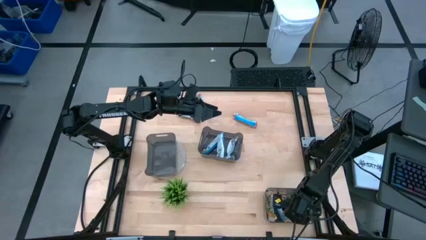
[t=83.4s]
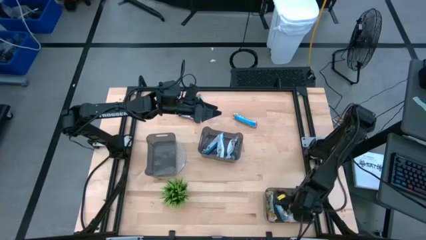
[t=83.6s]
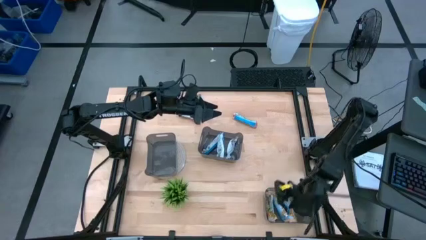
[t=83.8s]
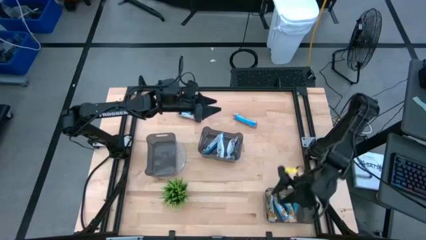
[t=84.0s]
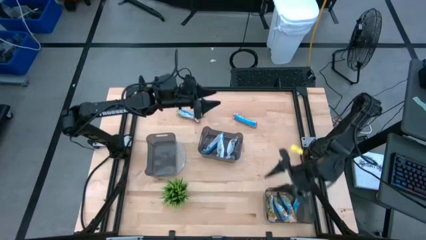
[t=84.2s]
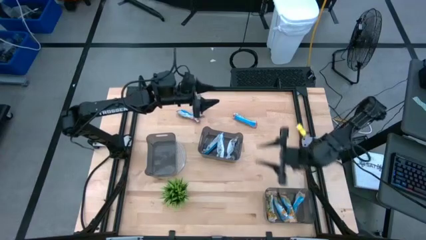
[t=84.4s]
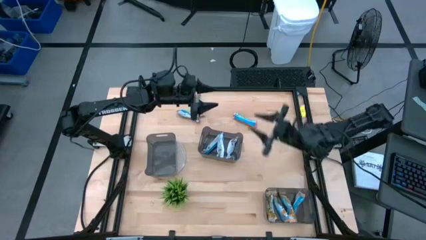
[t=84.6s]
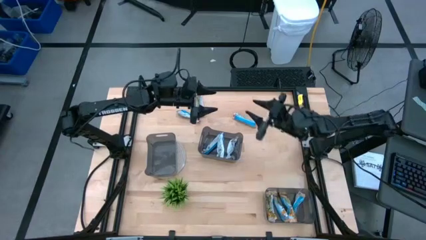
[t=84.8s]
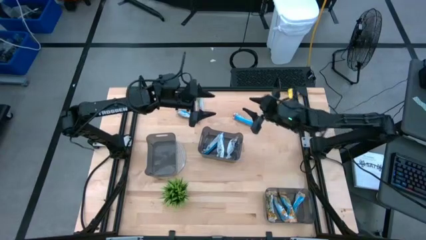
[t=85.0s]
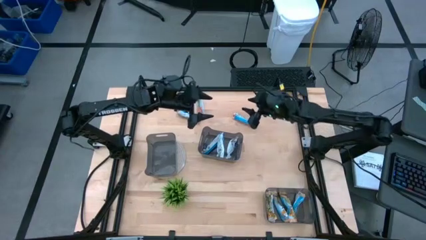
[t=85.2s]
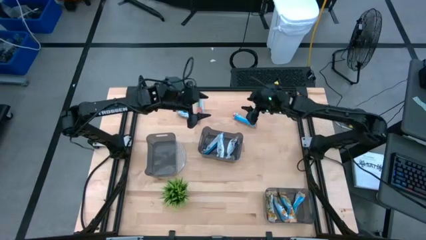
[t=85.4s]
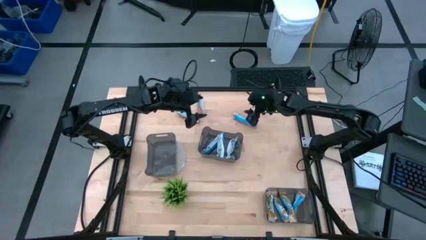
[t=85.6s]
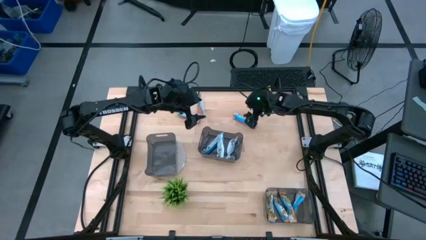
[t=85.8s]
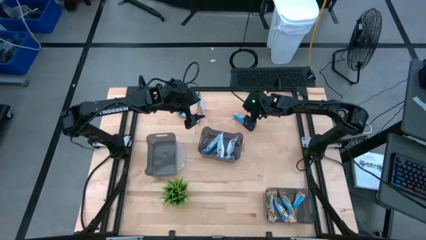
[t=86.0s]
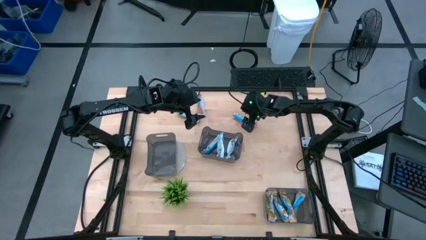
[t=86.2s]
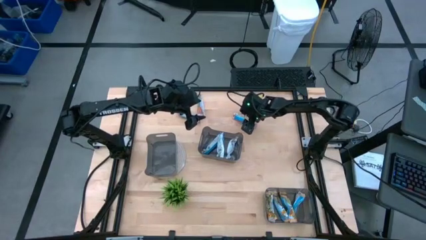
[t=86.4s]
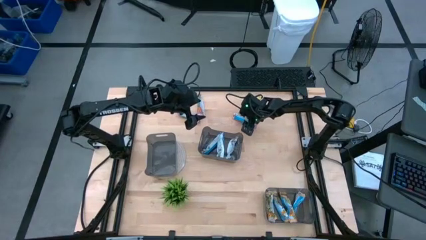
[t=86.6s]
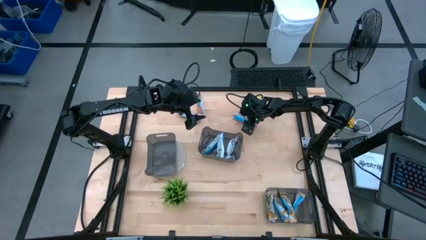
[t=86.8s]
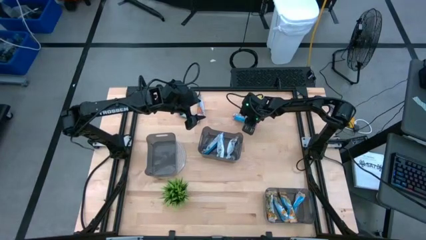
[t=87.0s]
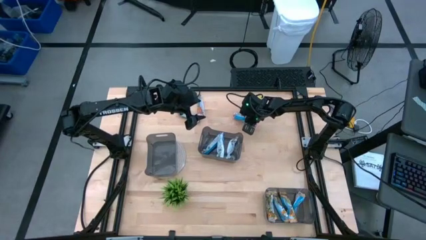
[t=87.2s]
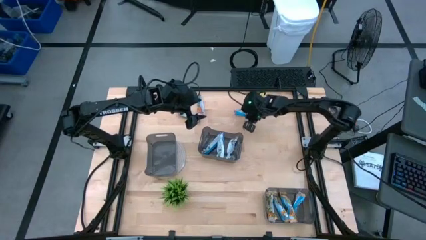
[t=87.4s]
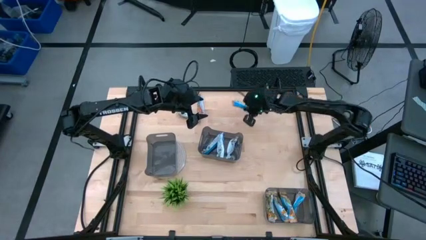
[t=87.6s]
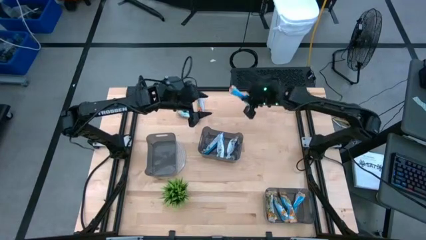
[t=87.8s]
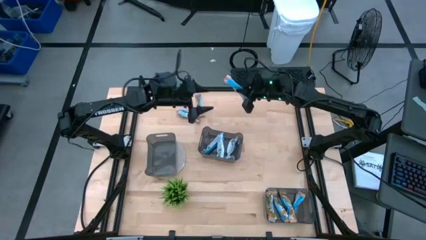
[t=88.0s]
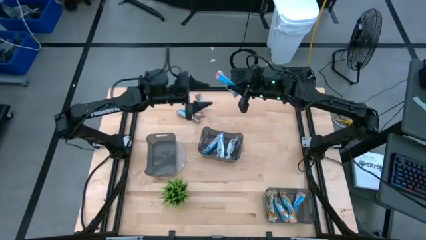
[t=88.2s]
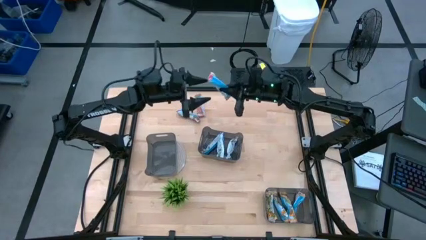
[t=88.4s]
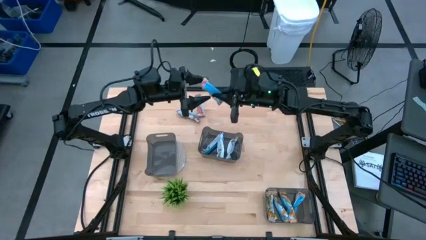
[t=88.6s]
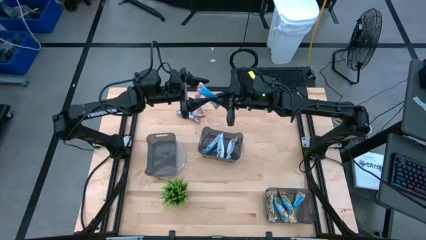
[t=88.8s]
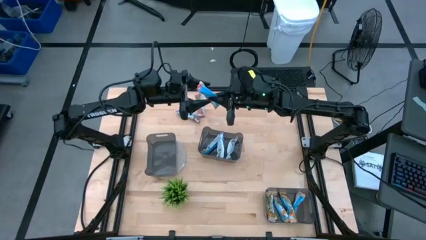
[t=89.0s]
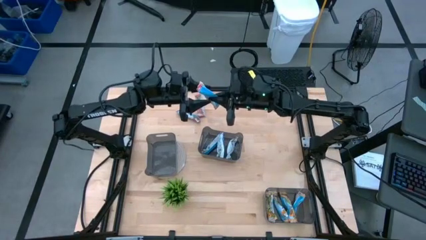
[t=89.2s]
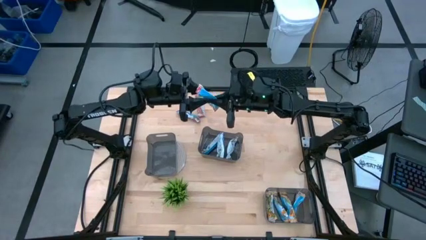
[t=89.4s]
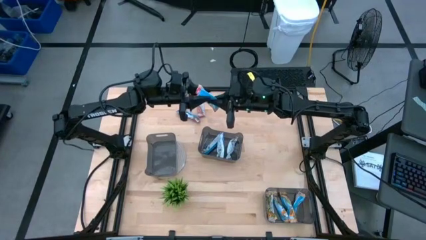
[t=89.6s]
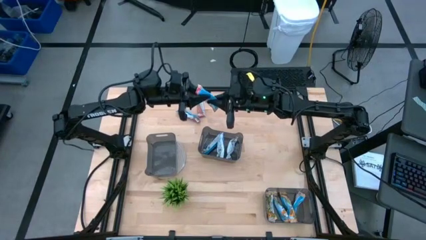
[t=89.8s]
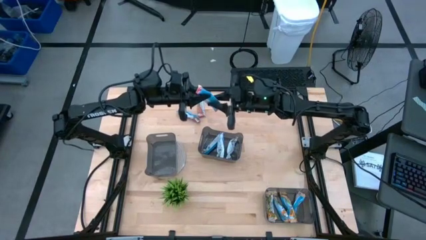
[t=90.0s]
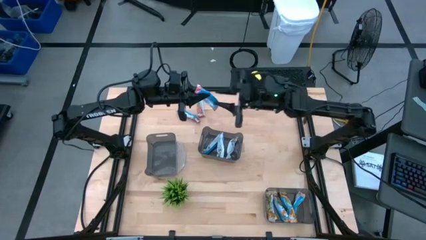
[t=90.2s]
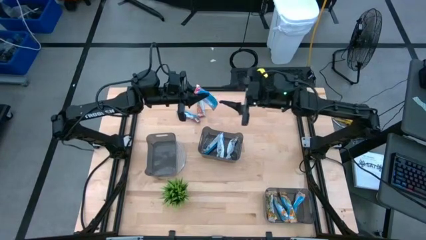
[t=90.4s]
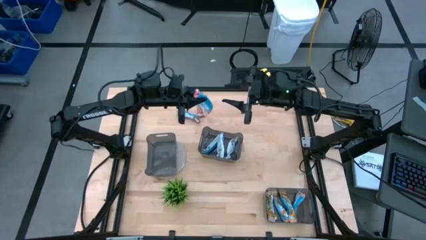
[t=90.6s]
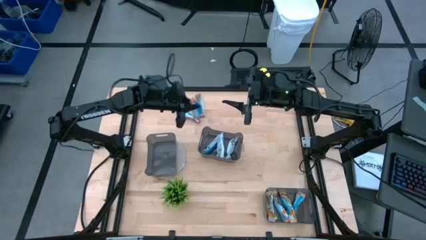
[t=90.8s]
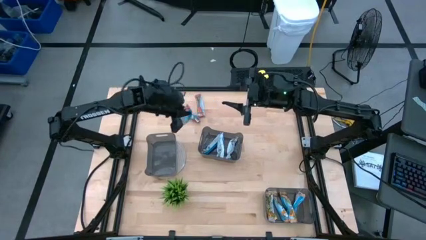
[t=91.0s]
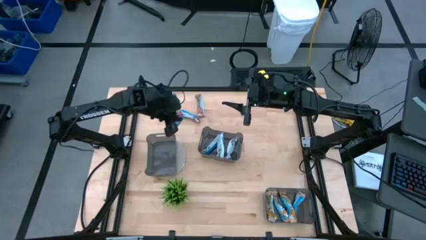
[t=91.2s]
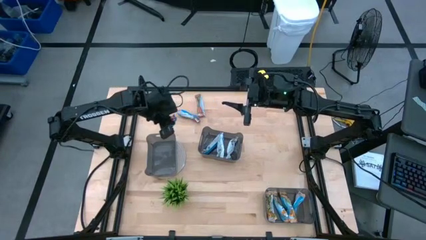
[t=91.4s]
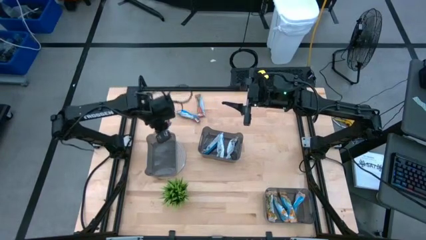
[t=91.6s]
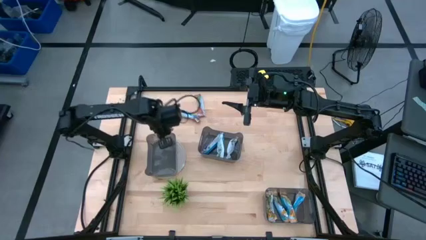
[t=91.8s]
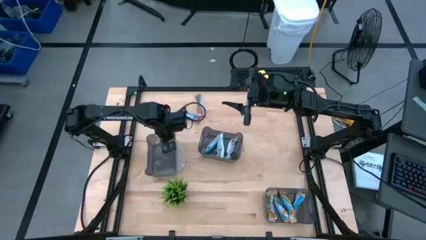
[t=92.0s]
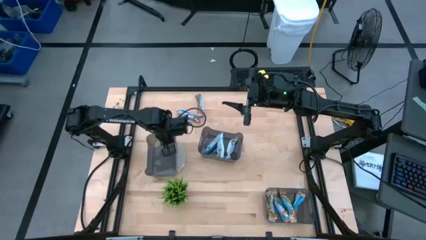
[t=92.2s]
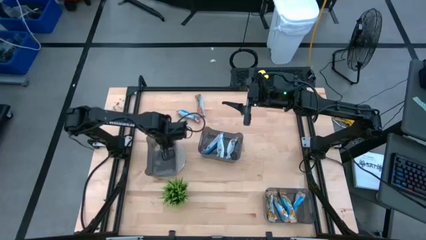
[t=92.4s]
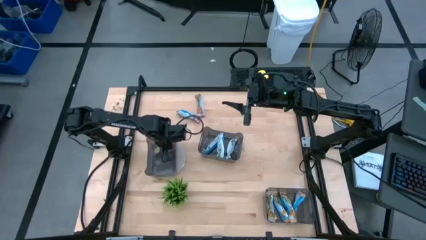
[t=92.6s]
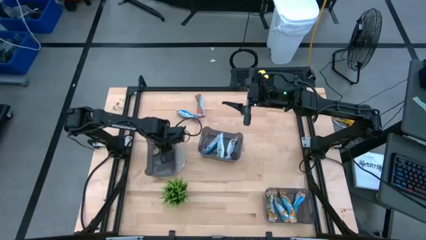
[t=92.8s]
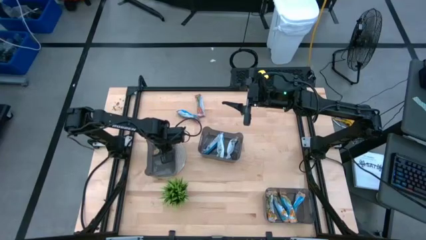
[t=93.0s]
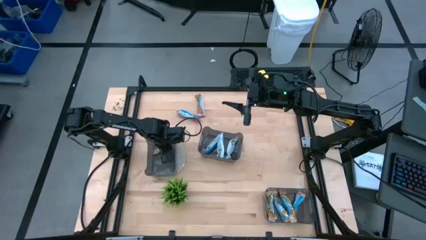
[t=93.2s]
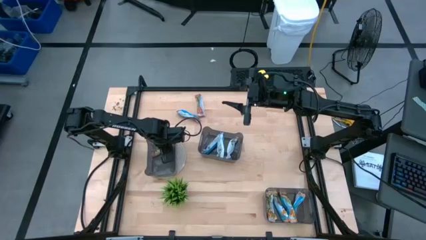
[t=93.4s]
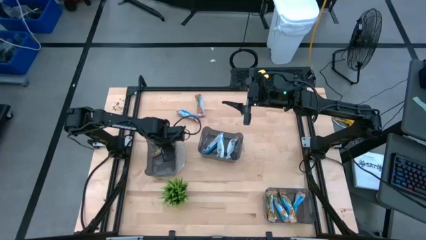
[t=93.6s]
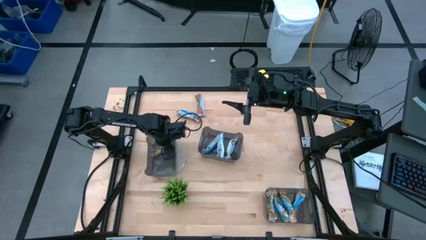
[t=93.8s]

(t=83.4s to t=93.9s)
Task: Pick and place Granola Bars by type
Put the red granola bar into the middle left black bin

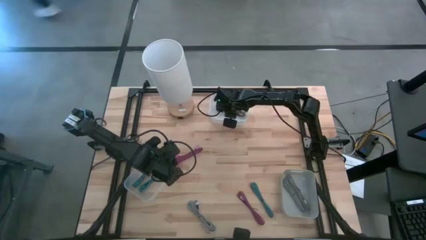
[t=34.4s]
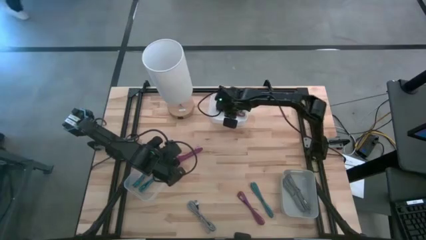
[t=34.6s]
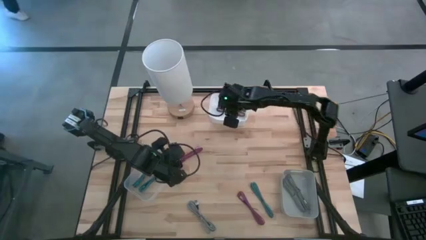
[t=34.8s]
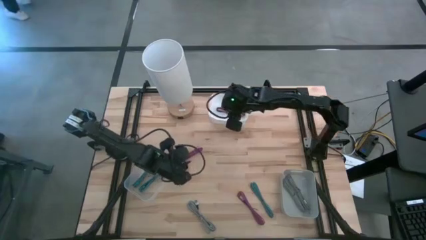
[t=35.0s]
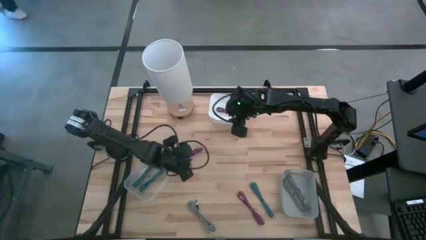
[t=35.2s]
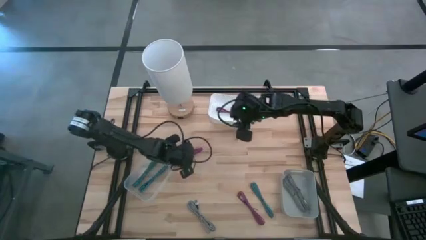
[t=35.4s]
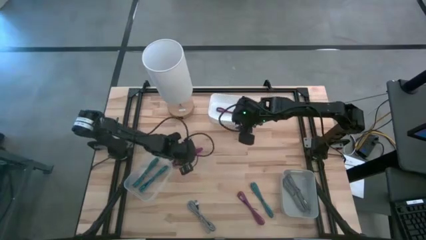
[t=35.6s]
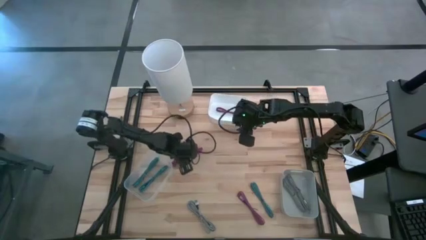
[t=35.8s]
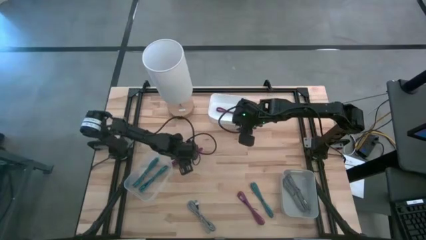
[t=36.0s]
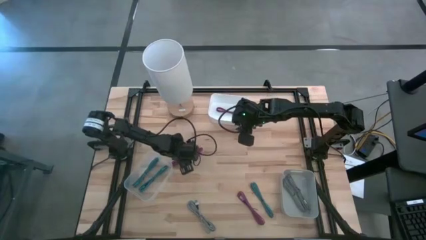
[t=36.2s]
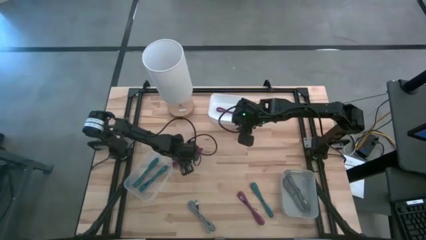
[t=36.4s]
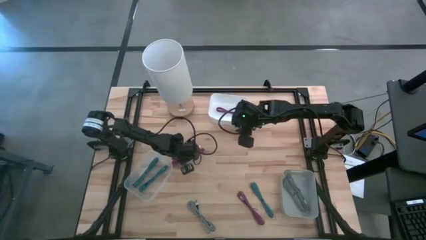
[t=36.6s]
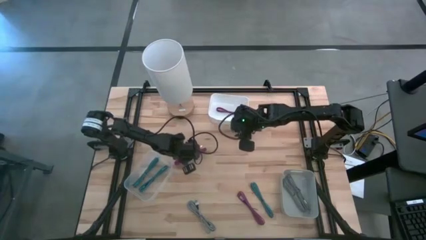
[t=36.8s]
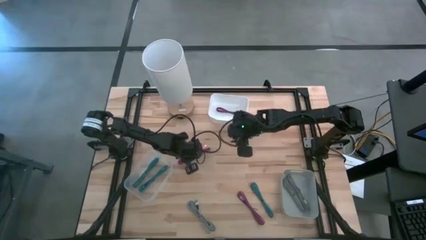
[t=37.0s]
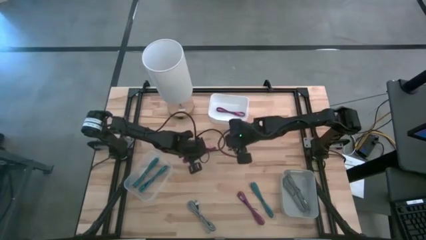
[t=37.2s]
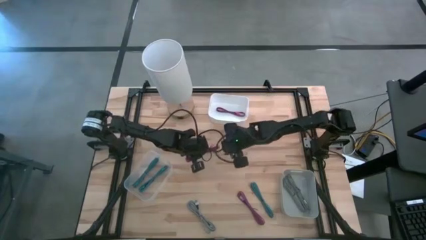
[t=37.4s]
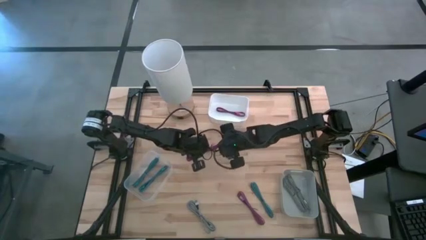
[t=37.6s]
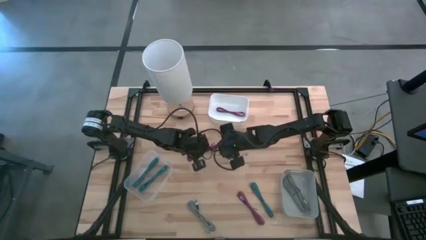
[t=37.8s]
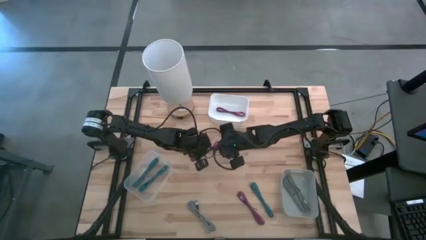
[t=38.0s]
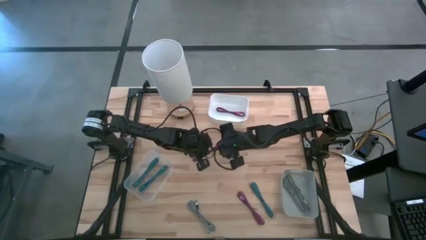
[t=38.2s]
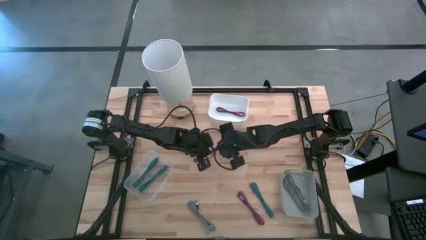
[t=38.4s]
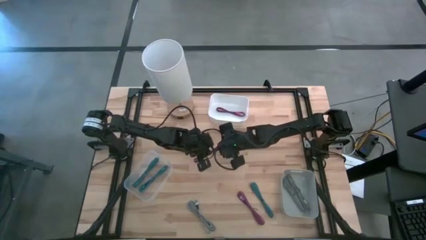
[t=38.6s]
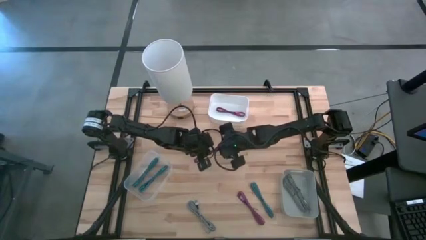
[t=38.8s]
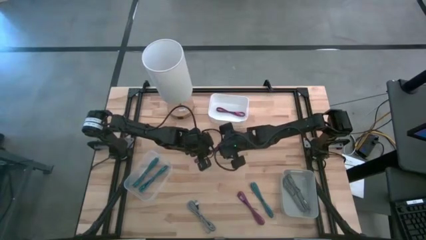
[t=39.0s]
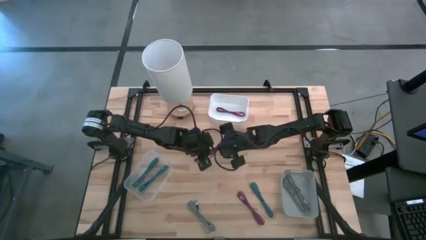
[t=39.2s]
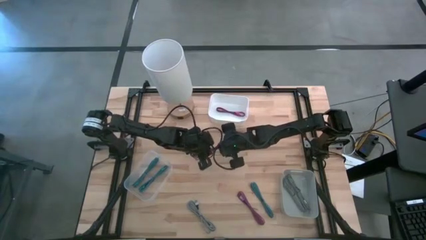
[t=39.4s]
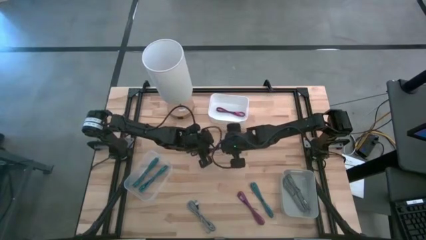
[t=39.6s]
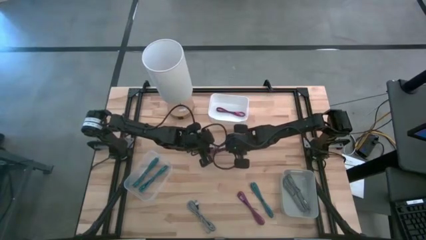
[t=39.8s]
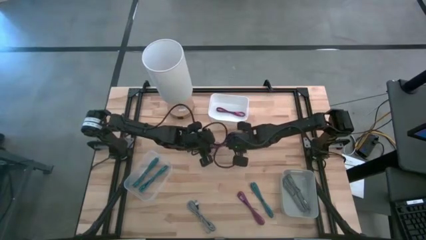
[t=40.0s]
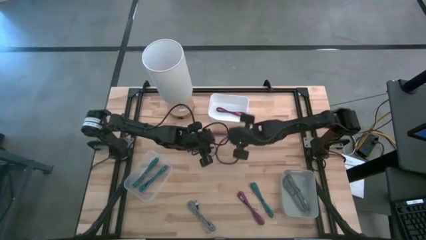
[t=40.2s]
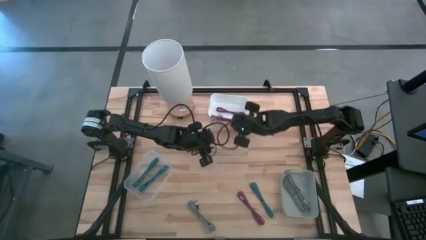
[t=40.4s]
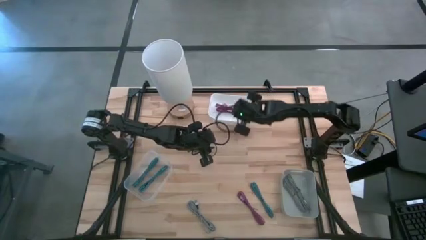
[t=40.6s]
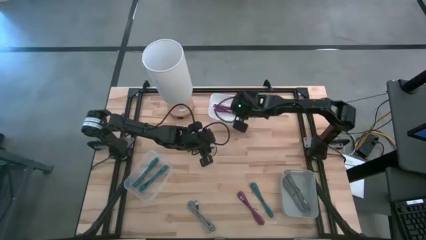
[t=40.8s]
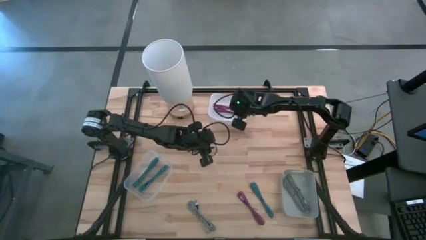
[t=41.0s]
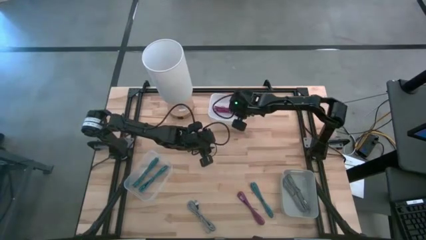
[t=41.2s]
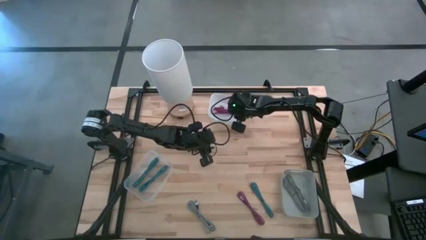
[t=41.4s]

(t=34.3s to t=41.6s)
Task: Pick & Place USB Port
Put the top pink charger cable into the white bin
